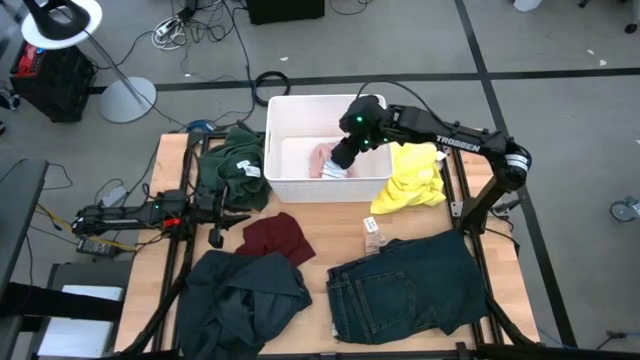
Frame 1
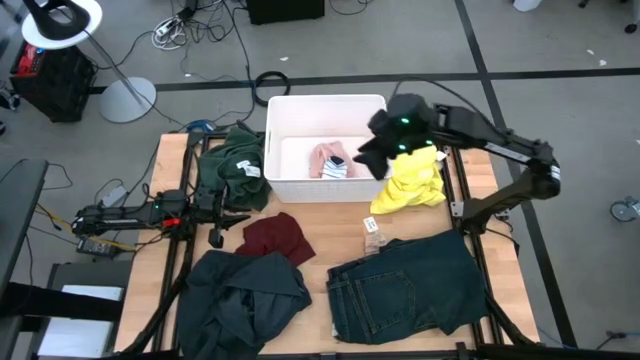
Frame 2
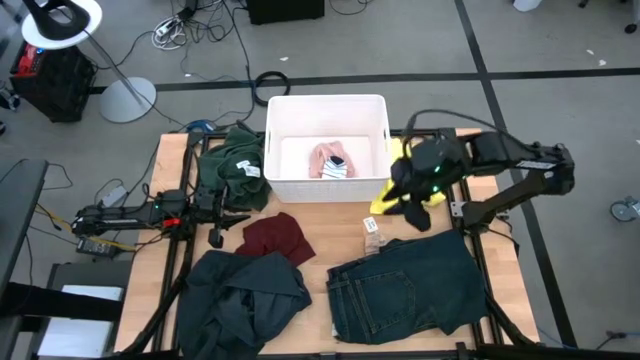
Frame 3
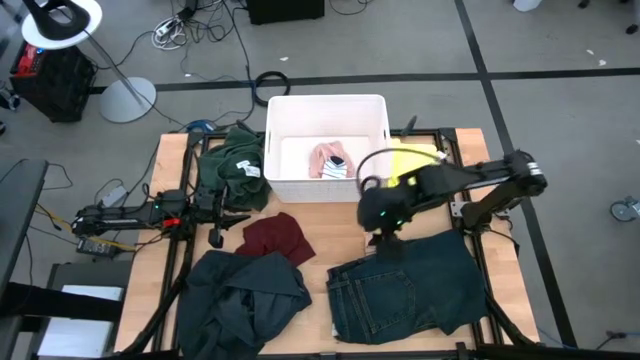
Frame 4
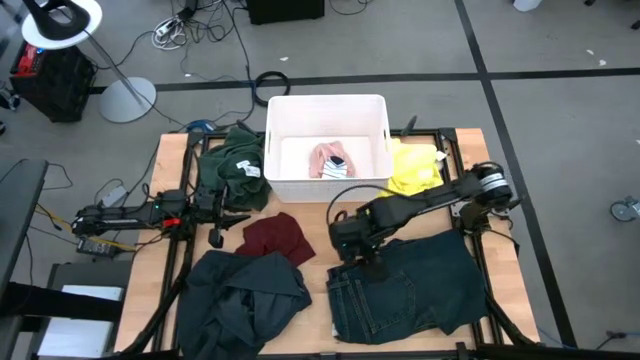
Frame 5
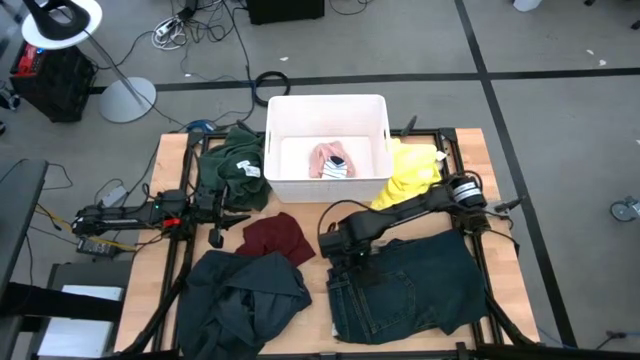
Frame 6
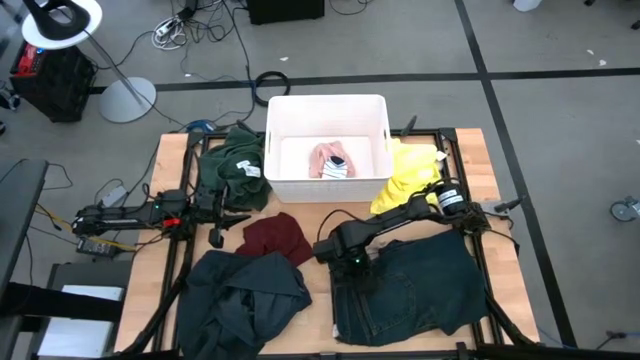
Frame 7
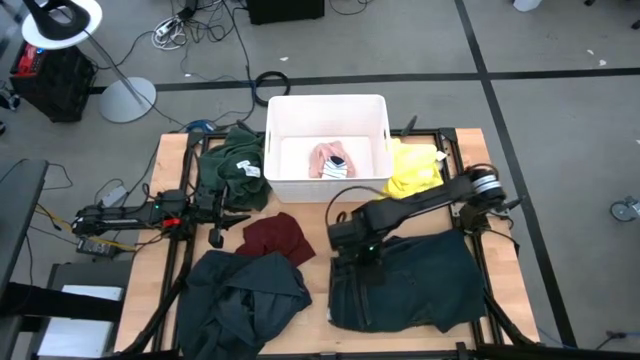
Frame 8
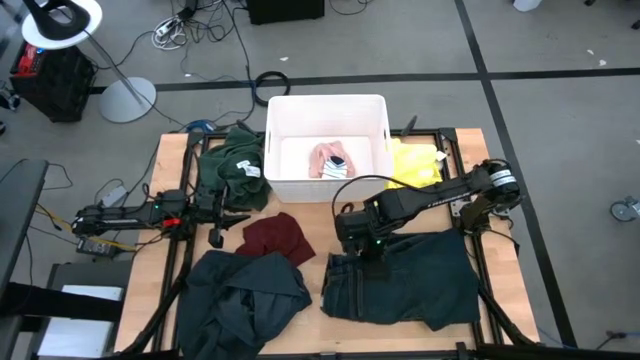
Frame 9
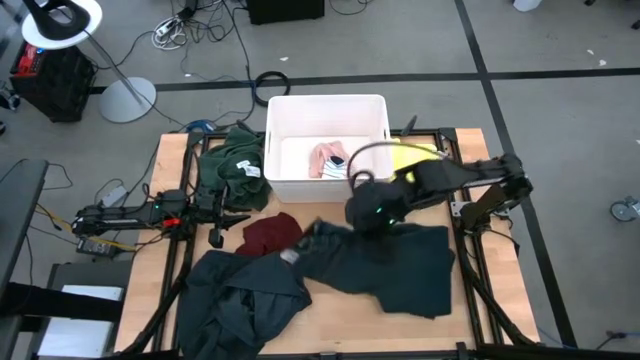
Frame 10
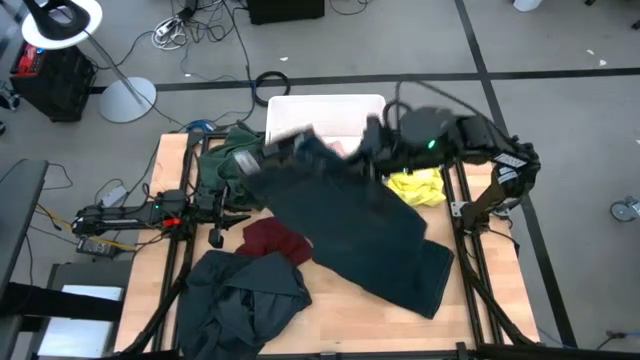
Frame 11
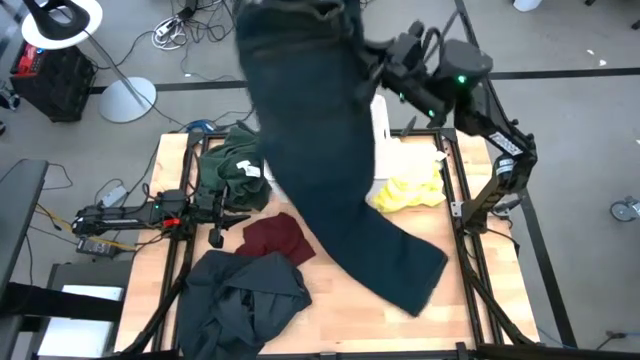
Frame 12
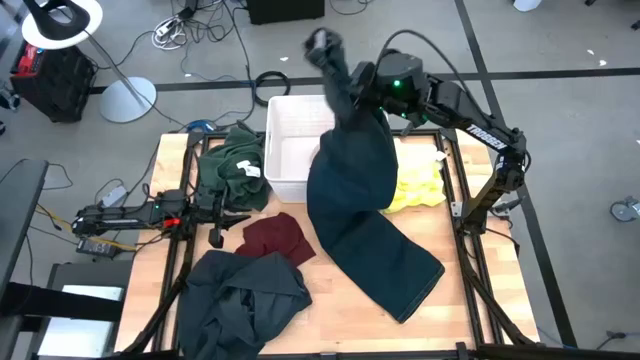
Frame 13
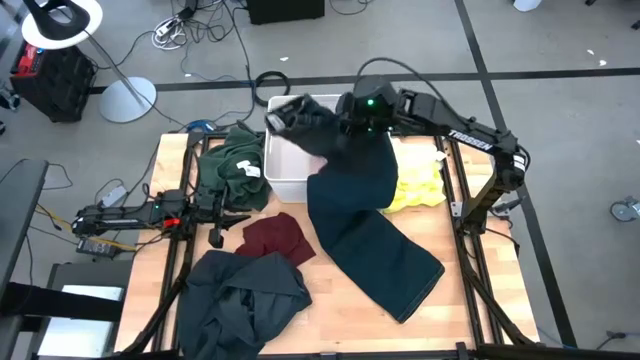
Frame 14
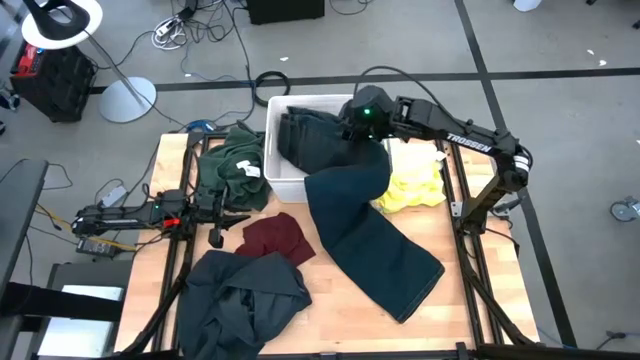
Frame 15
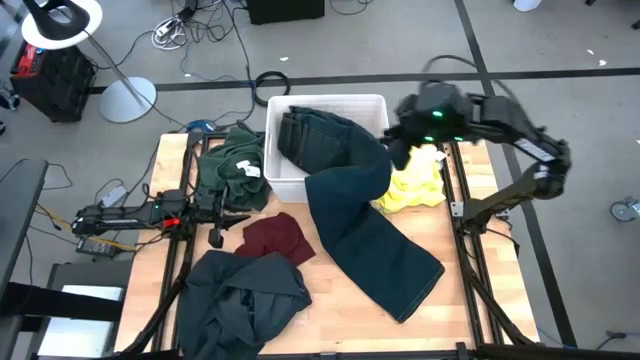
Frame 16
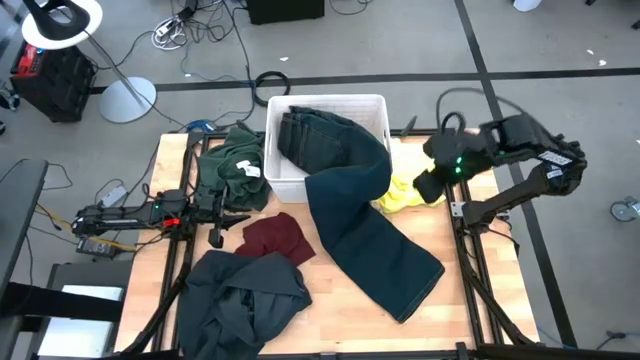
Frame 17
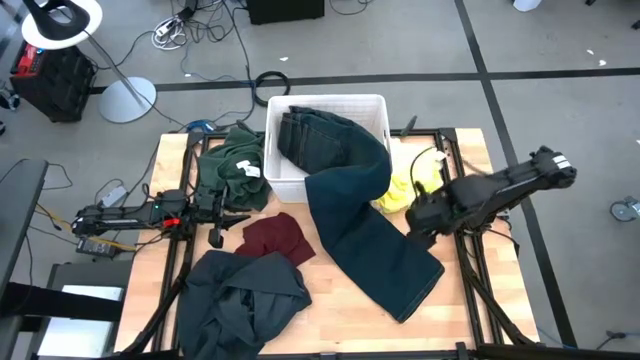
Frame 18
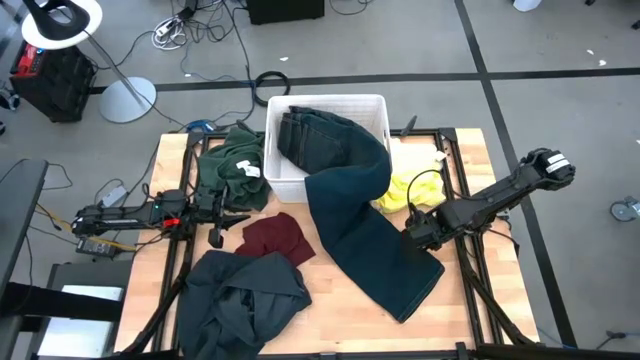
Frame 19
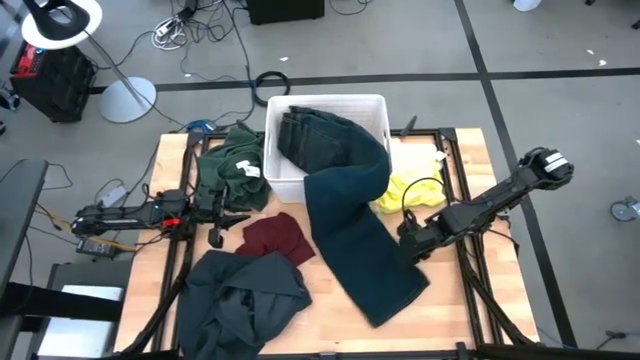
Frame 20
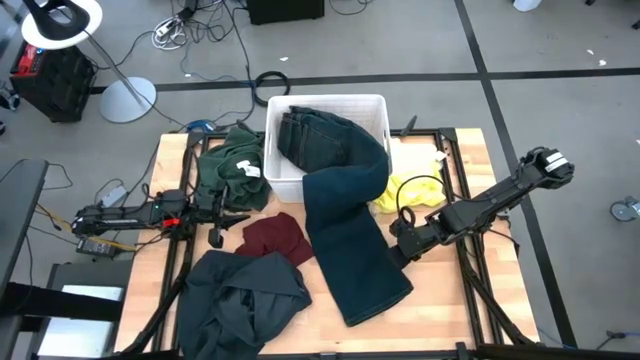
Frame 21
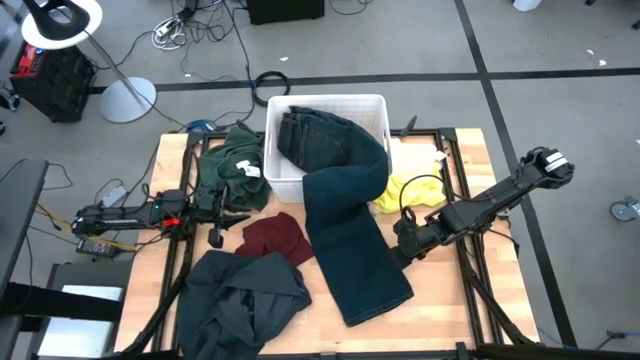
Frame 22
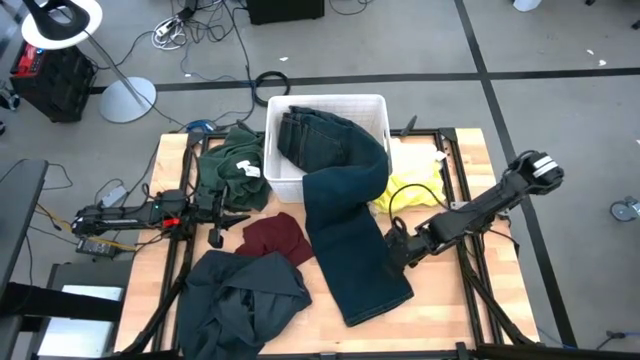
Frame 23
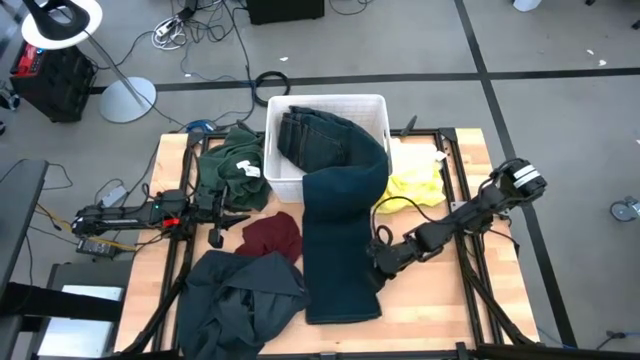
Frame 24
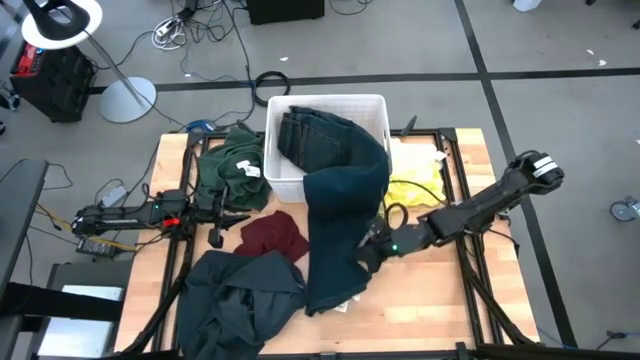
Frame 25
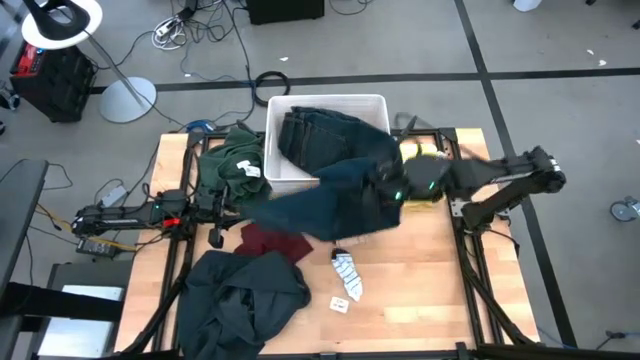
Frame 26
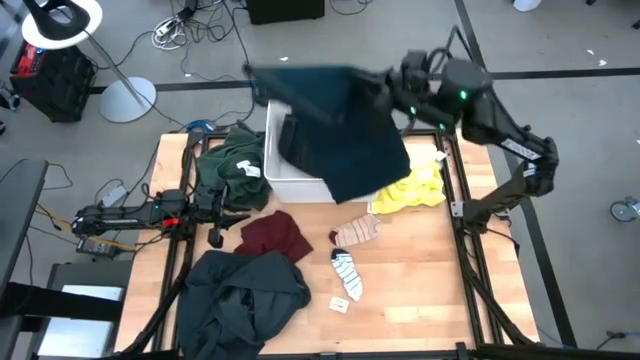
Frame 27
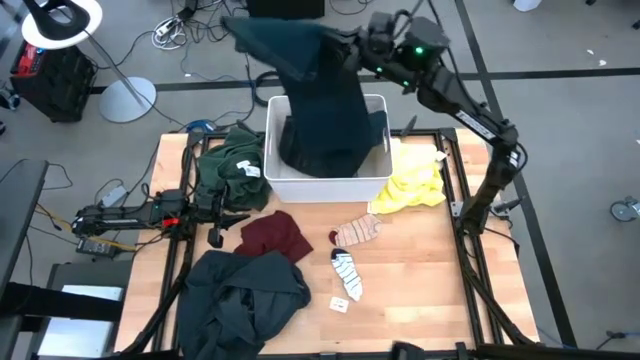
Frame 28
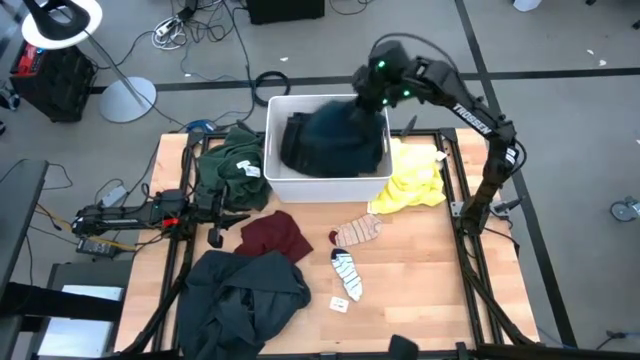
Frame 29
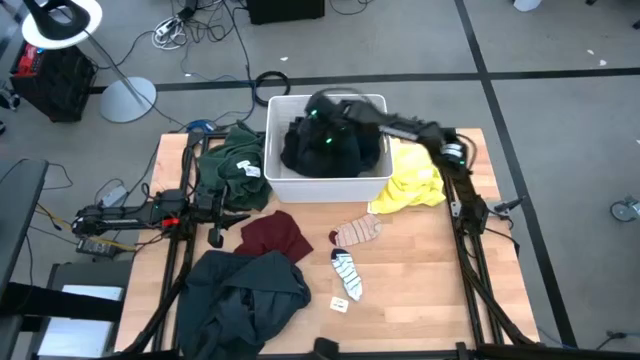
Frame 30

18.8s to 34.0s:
Task: Sort clothes
Put the jeans into the white bin

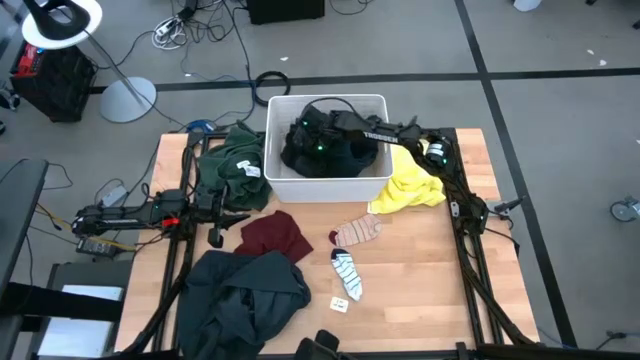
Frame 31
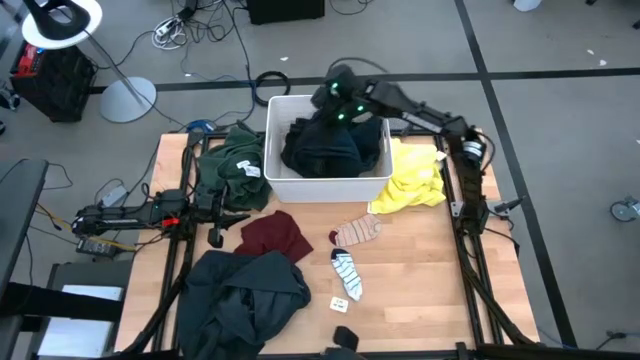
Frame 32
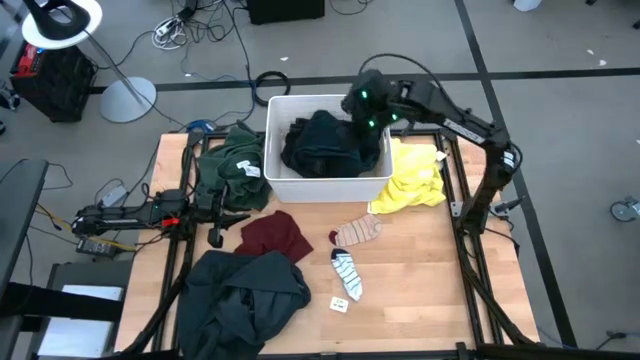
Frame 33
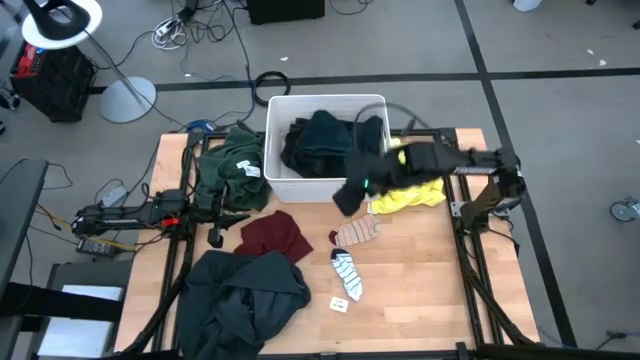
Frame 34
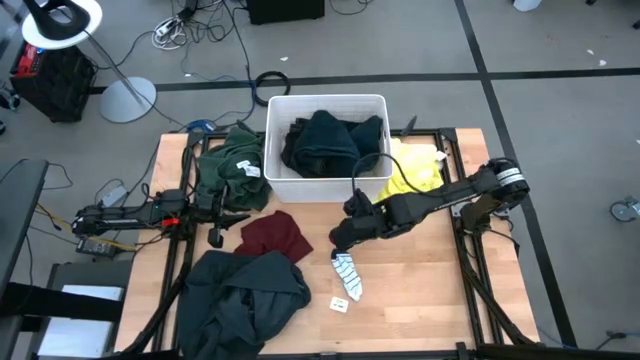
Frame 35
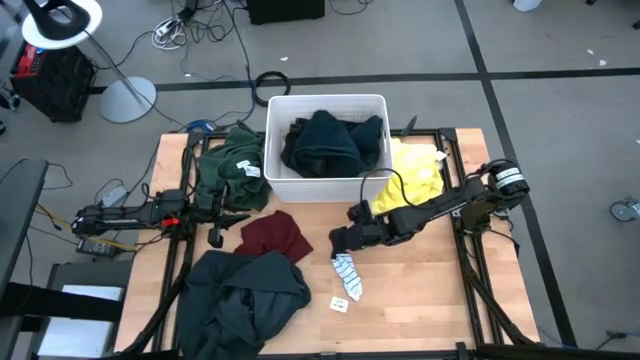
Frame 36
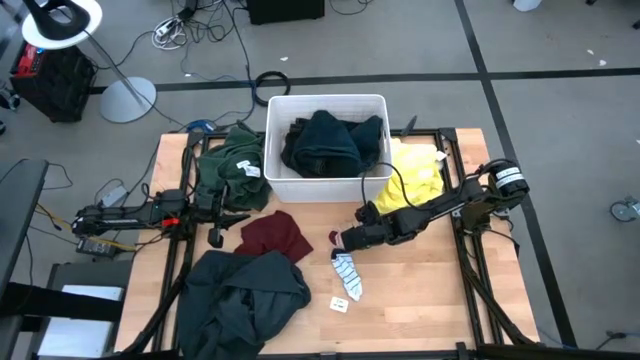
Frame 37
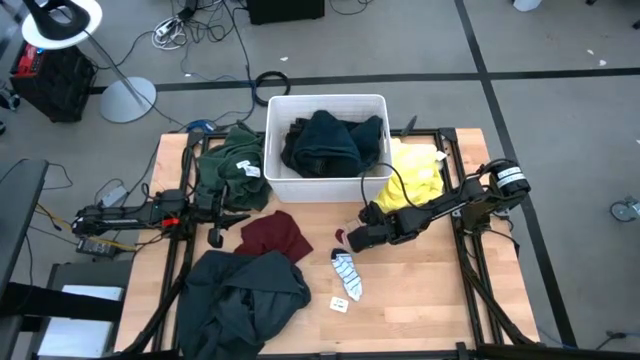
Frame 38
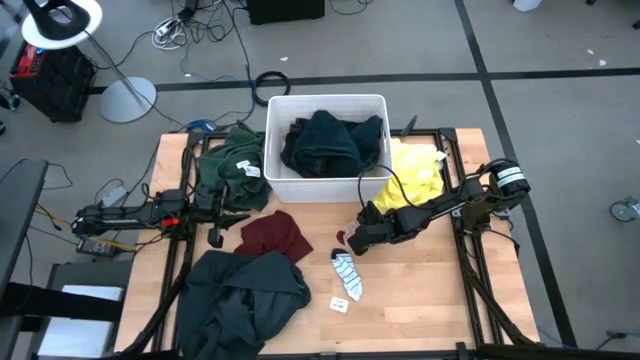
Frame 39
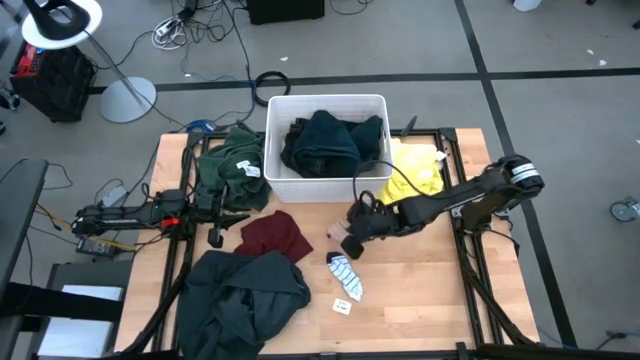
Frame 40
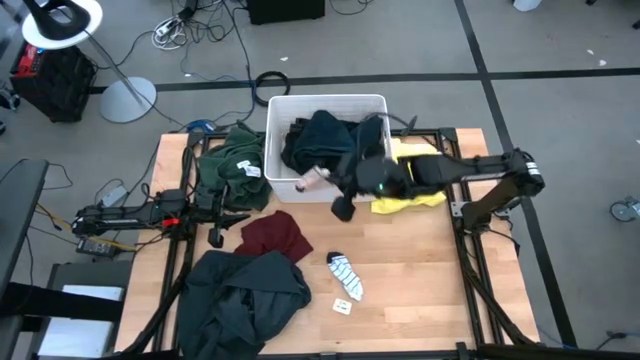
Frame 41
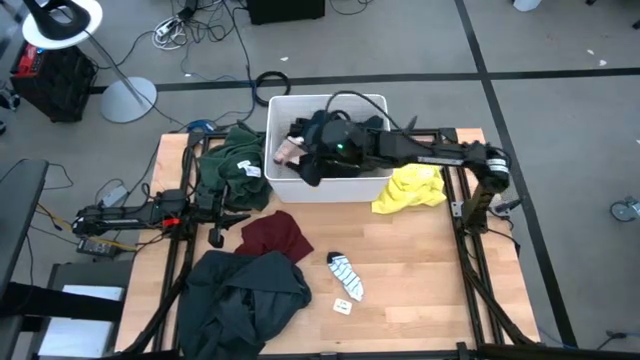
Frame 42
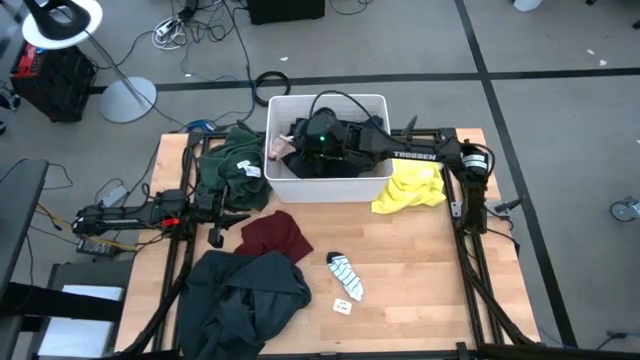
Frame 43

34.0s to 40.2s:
Put the brown sock into the white bin

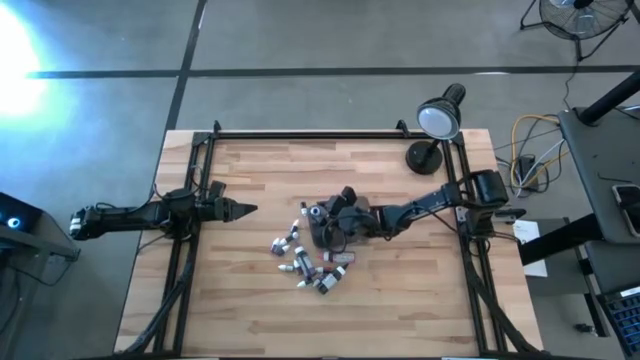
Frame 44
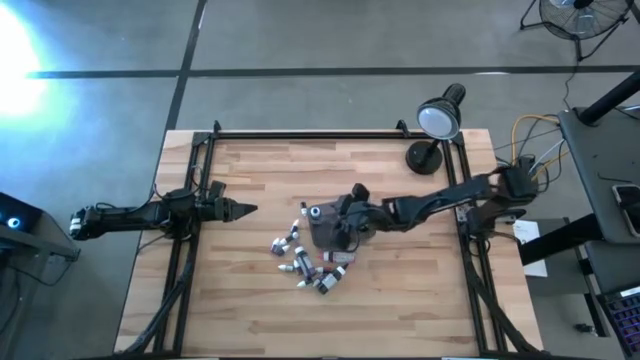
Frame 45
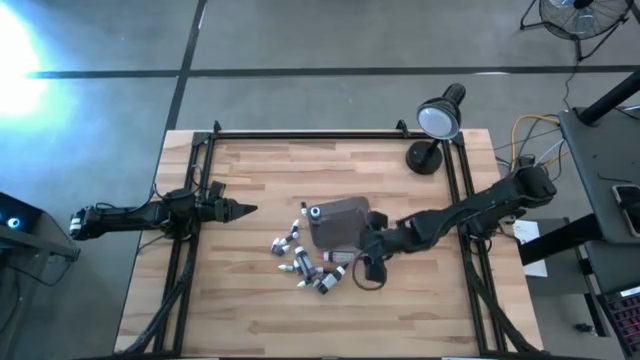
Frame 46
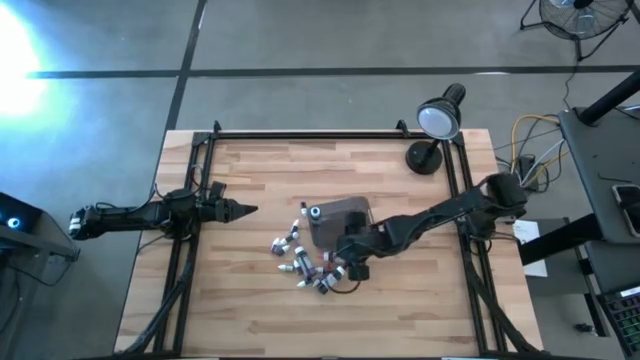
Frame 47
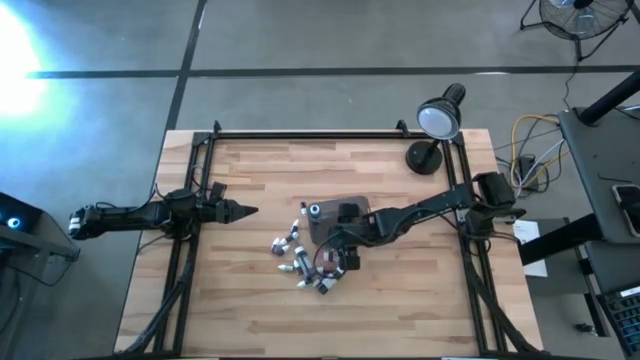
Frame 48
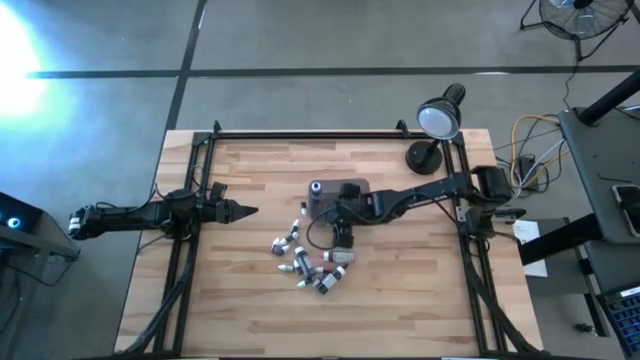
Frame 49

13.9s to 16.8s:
Task: Pick & Place food coloring
Adjust the black transparent bin
